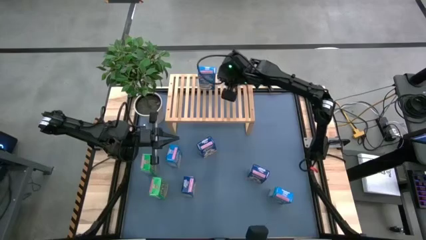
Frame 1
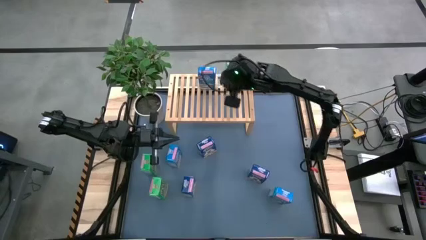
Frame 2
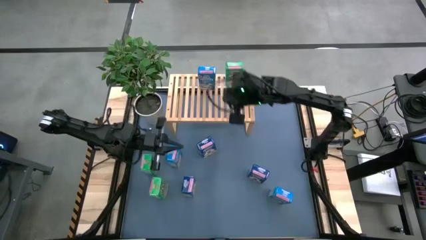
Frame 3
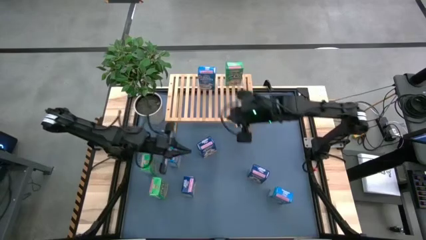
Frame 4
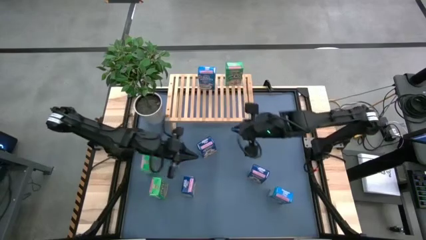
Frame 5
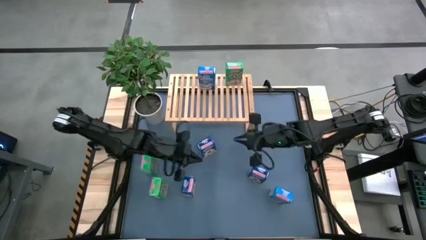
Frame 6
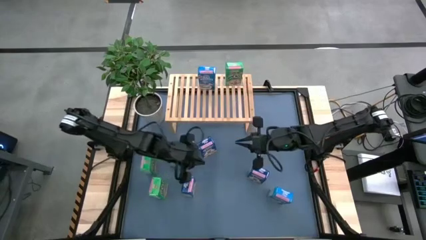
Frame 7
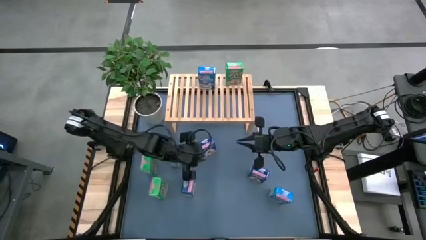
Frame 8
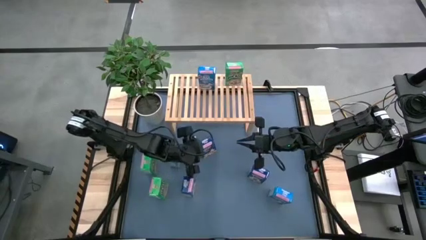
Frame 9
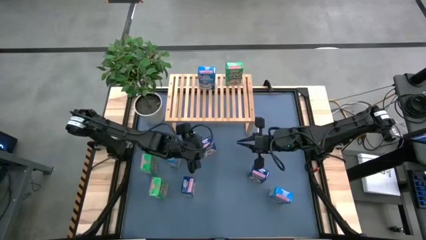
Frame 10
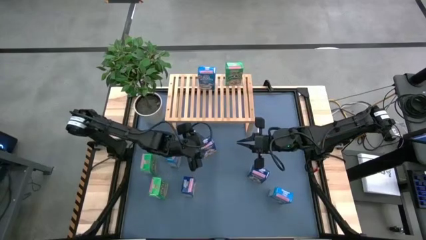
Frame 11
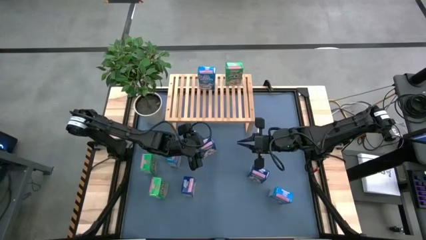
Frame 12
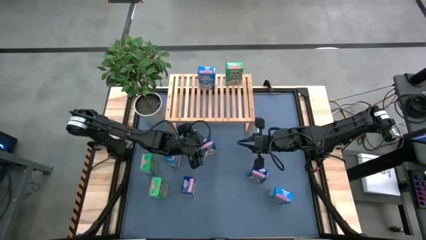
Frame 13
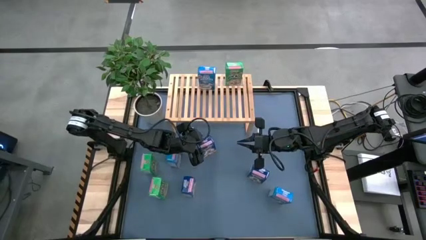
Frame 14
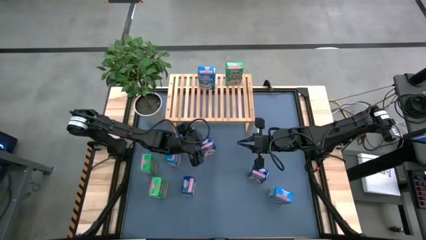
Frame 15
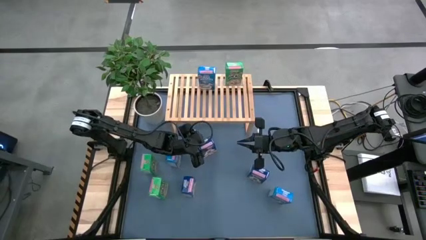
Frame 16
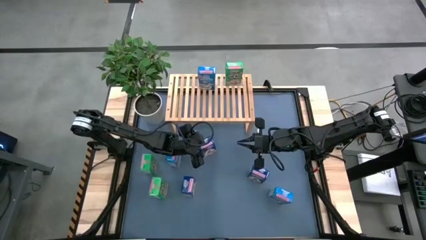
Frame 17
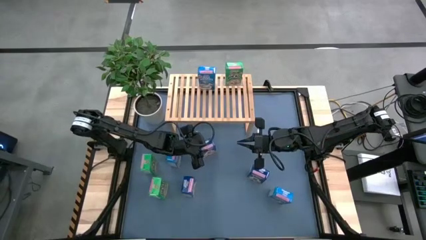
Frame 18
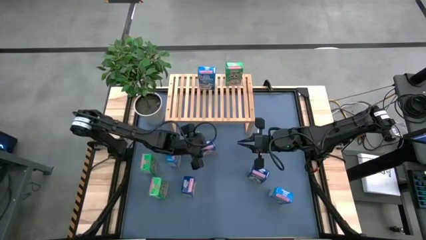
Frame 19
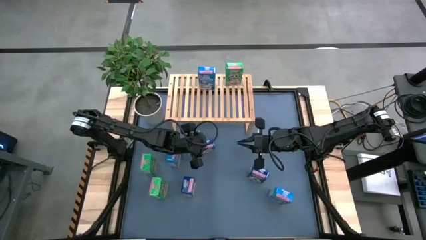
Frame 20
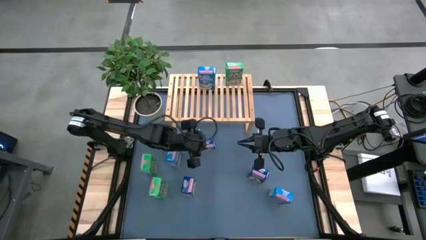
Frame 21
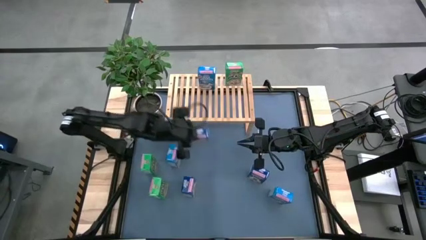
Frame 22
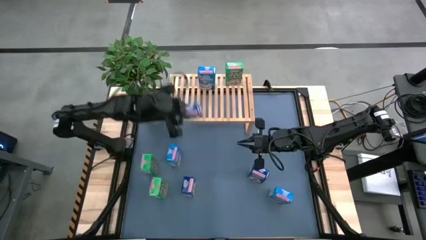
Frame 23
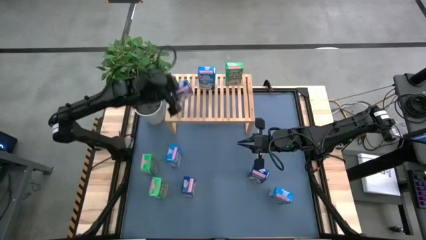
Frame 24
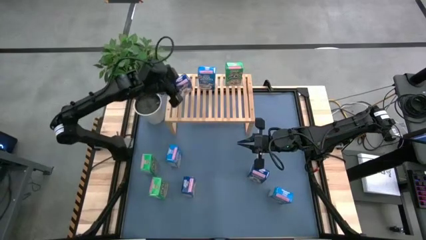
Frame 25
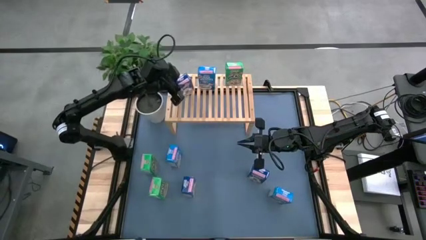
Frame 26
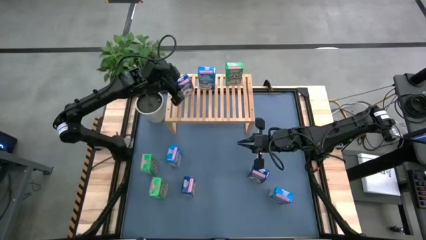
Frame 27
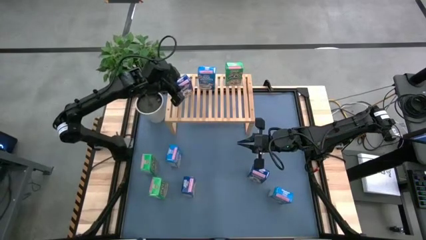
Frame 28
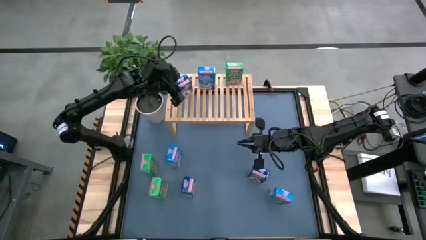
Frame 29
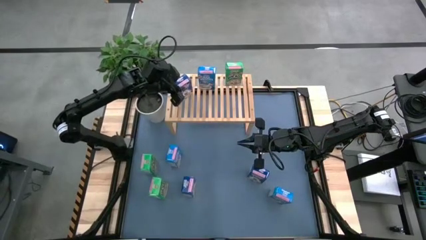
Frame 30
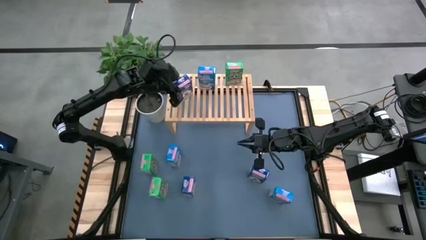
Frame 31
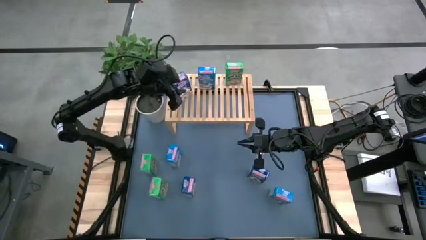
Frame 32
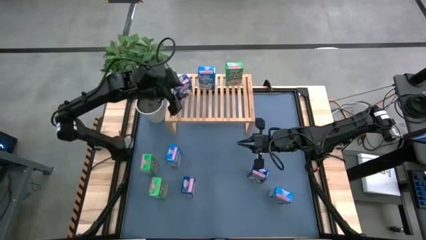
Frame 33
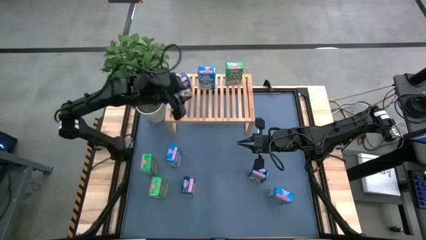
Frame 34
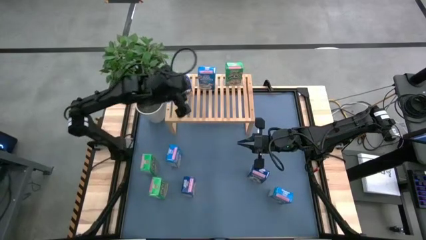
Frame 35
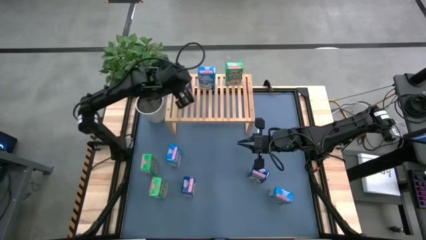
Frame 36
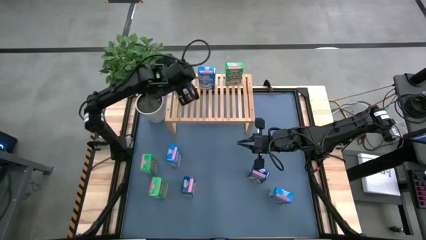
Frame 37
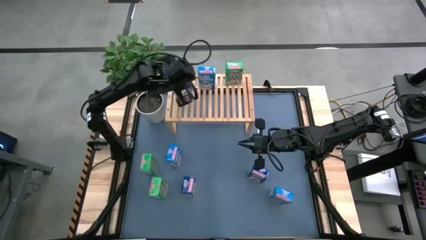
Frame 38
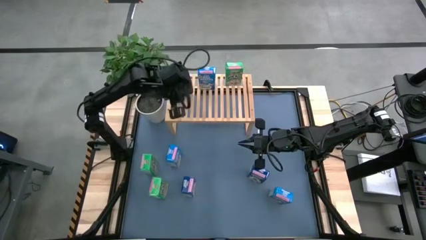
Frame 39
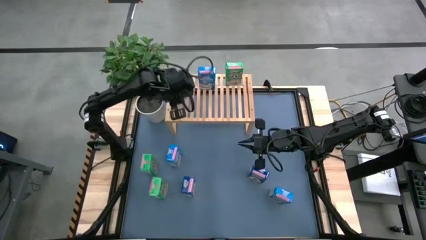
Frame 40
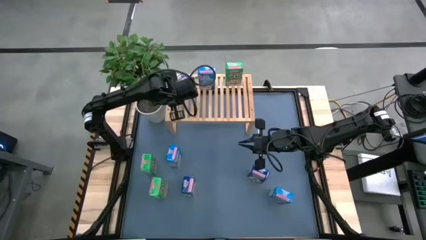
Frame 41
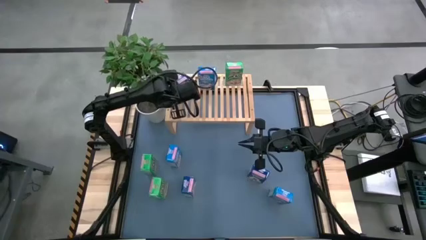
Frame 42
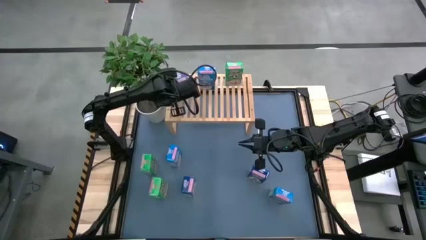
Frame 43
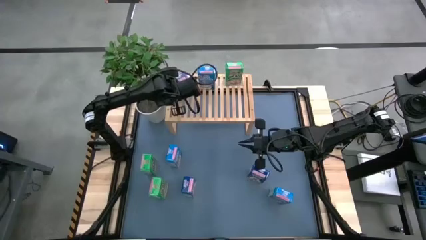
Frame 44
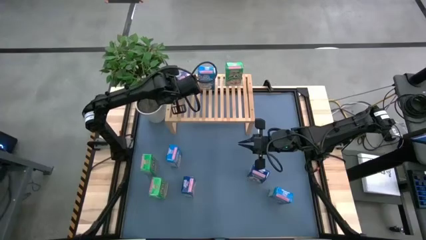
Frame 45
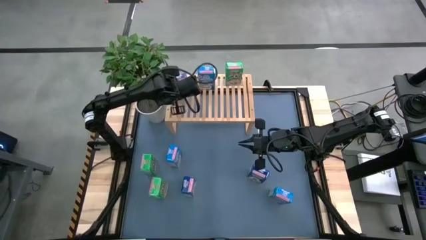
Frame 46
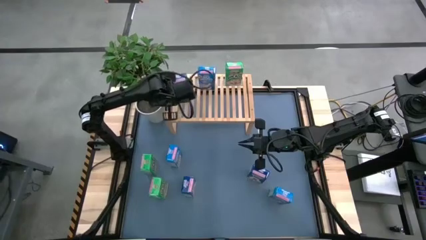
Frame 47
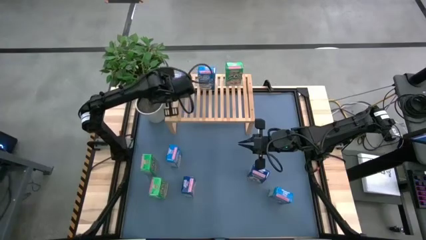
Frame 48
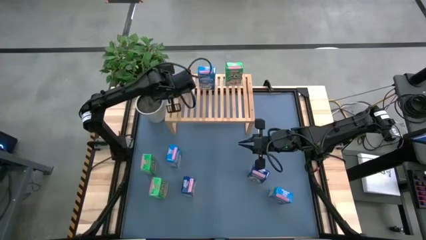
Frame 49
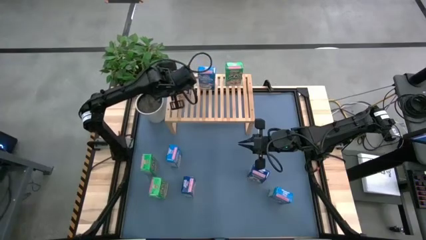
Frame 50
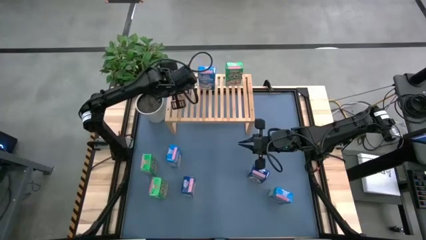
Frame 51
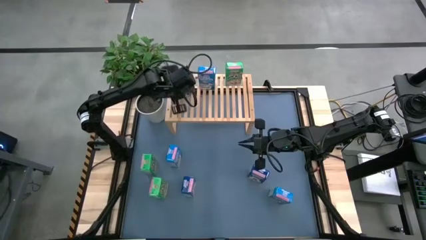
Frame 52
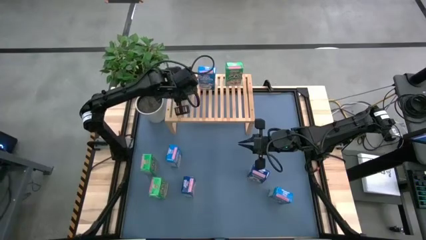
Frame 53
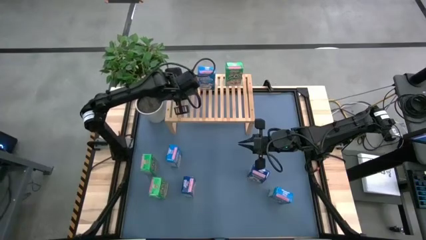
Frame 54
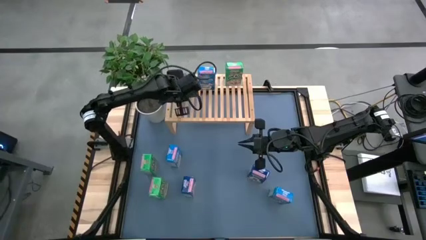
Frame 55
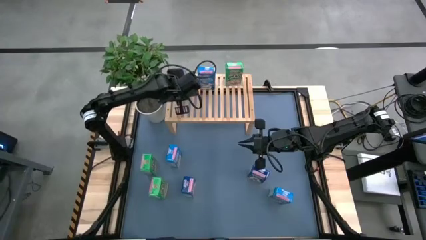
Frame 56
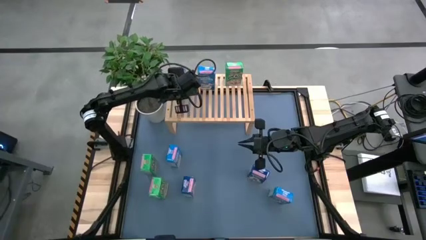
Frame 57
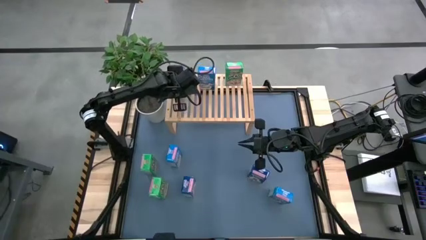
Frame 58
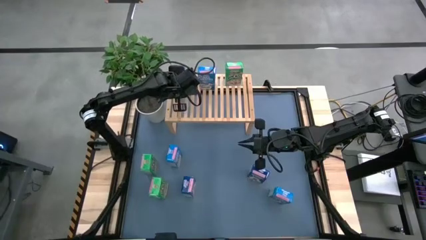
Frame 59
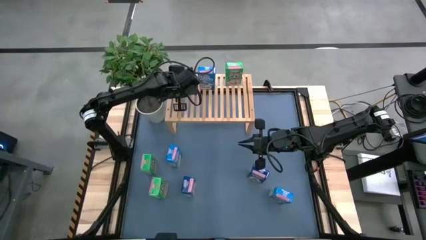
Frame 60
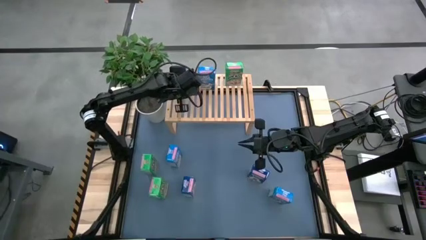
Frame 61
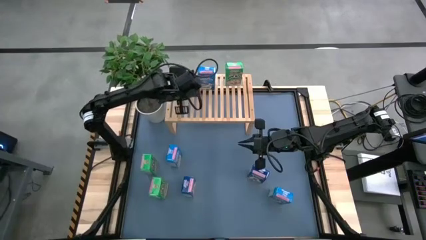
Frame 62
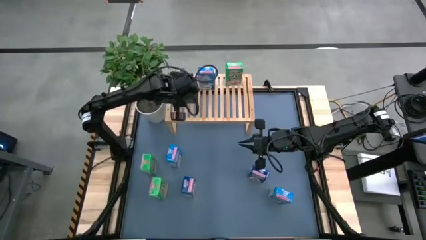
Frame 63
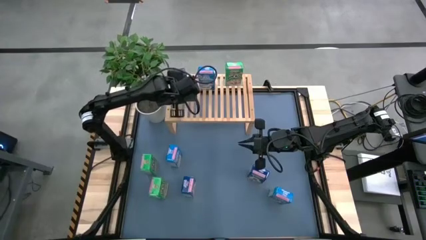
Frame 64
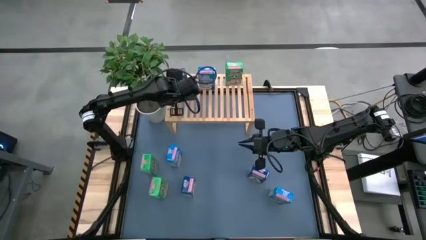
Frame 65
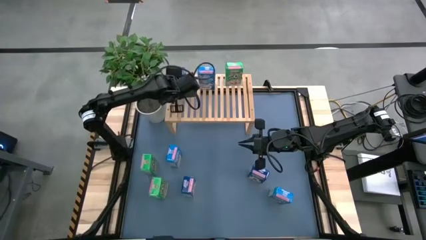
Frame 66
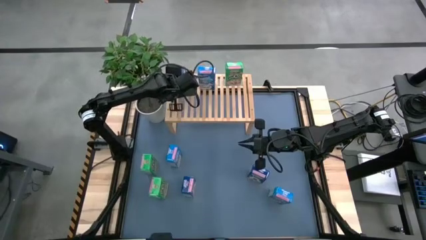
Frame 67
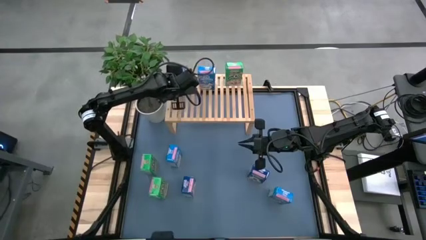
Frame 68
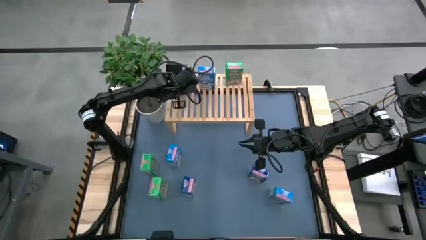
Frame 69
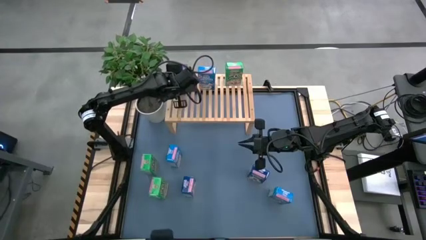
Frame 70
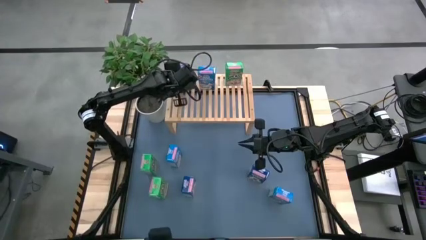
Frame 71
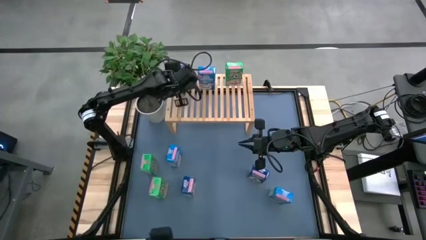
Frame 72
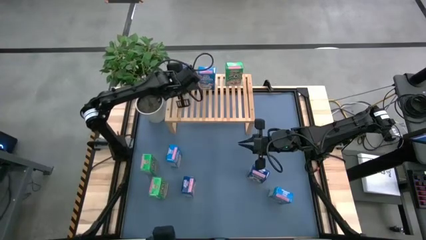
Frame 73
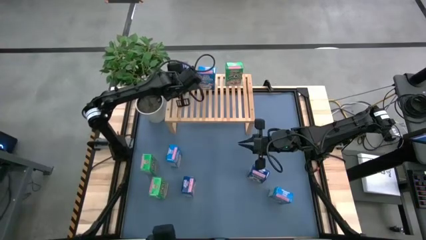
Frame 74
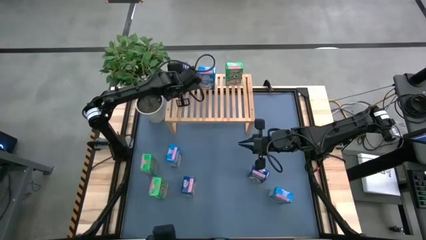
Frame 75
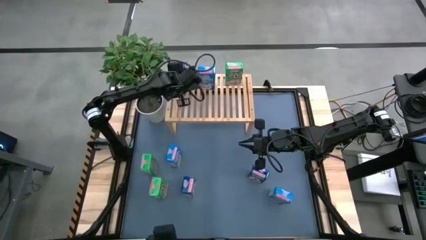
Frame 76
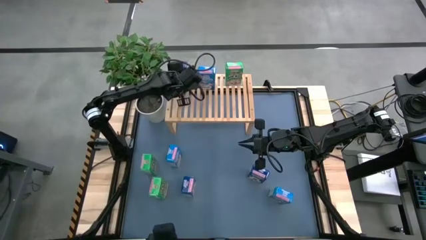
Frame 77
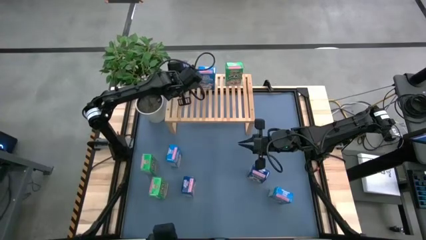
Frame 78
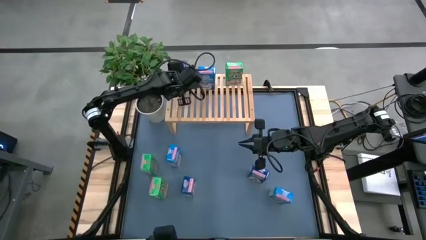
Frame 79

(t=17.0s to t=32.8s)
Task: Stack cereal on shelf
Put the top blue cereal box on the shelf
